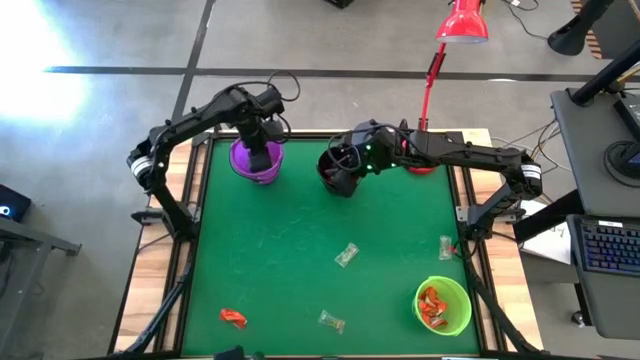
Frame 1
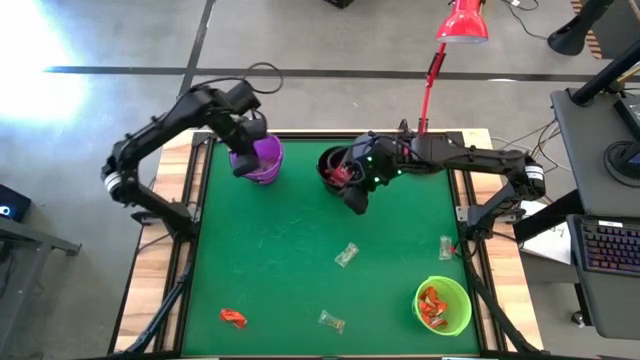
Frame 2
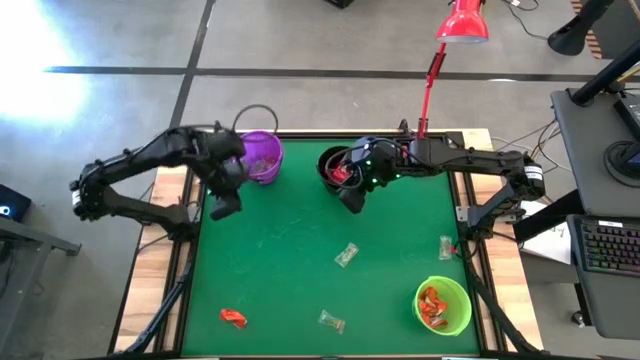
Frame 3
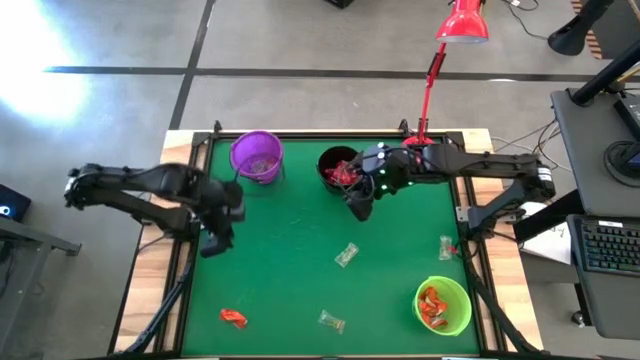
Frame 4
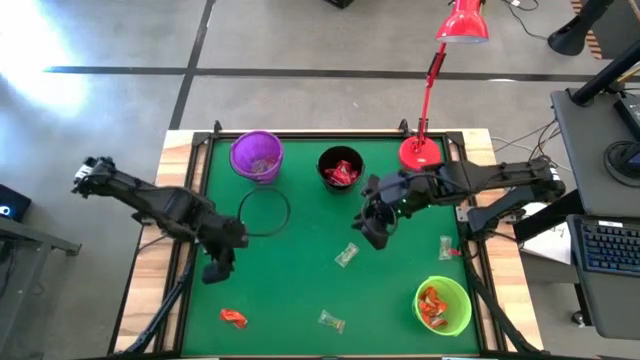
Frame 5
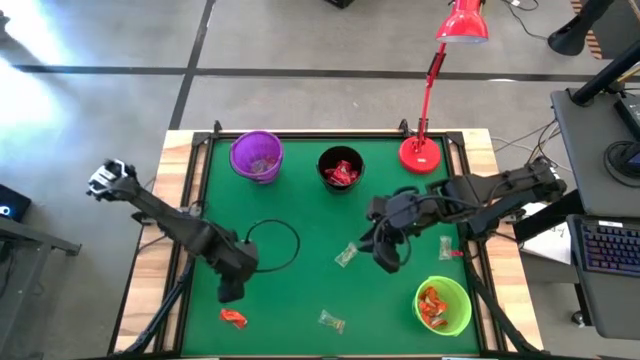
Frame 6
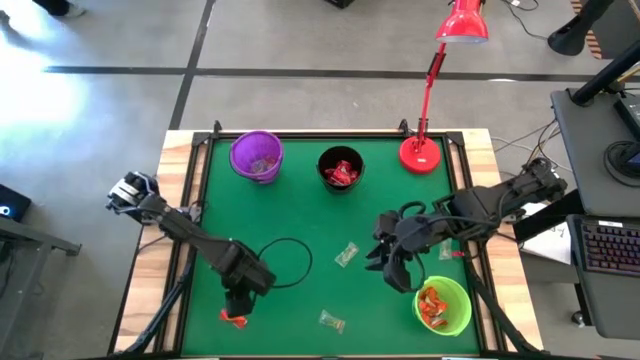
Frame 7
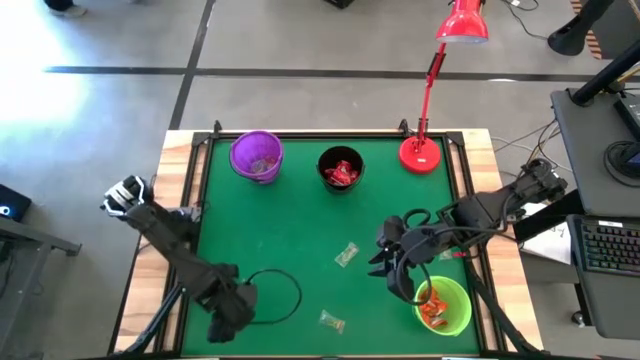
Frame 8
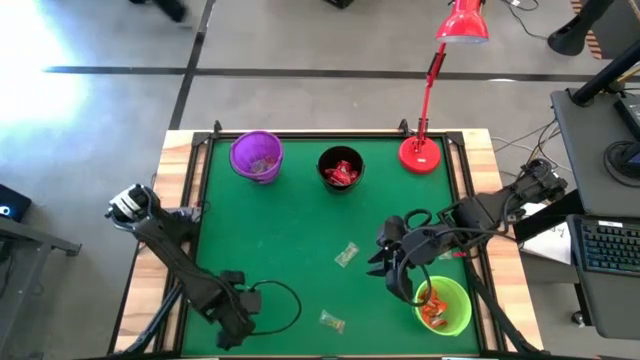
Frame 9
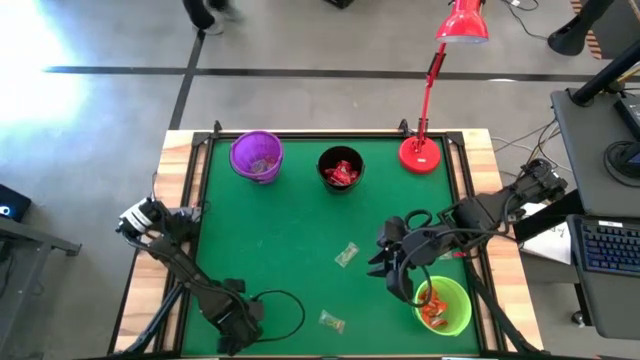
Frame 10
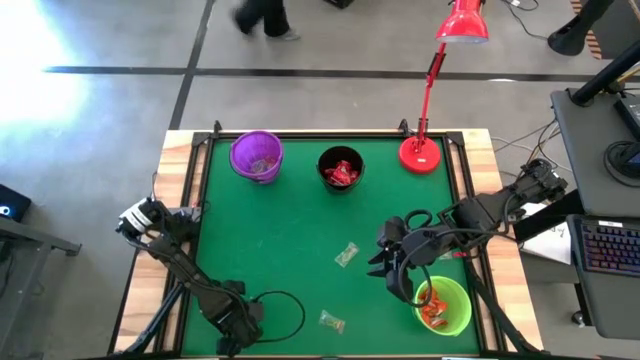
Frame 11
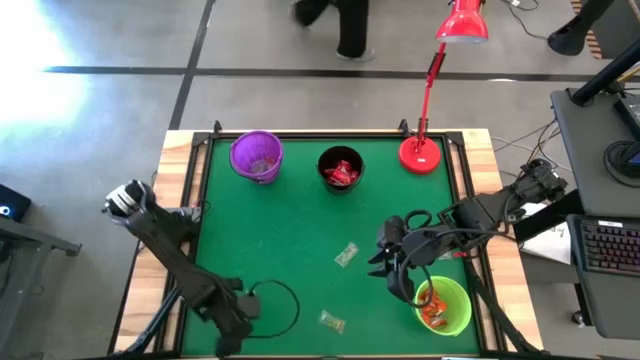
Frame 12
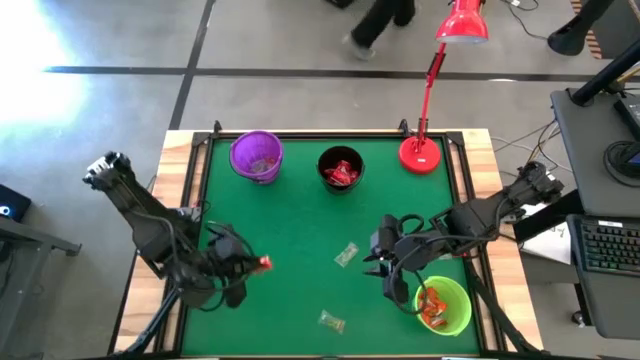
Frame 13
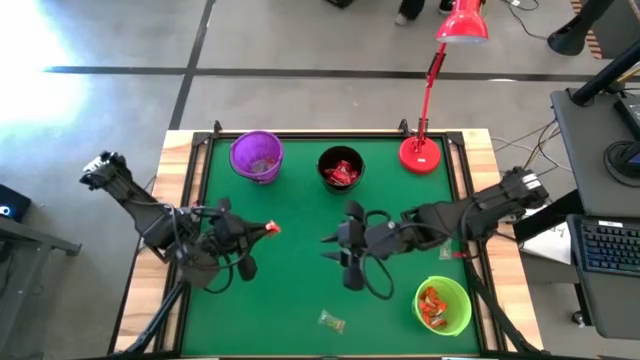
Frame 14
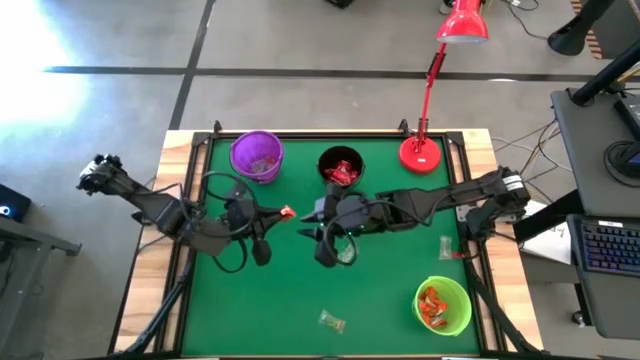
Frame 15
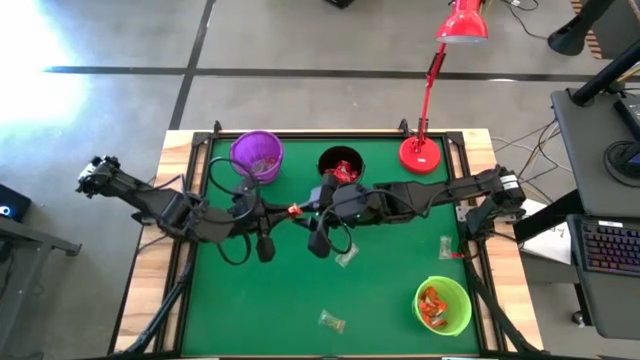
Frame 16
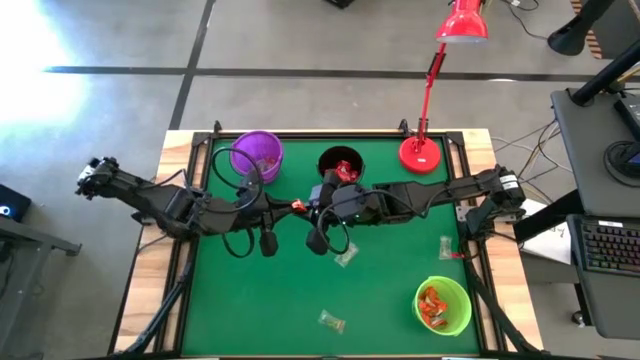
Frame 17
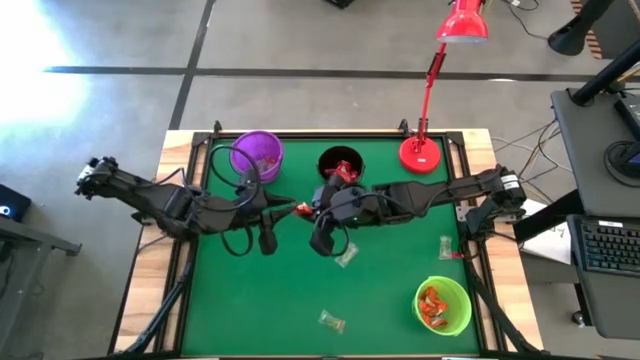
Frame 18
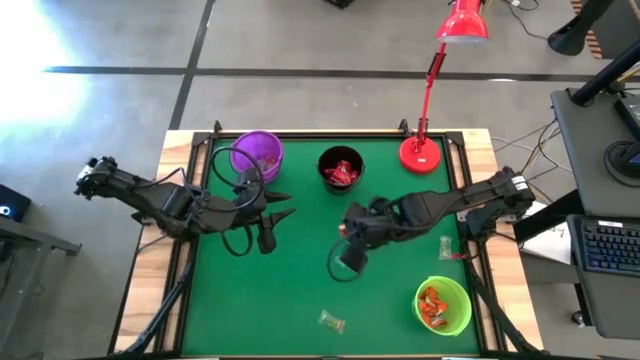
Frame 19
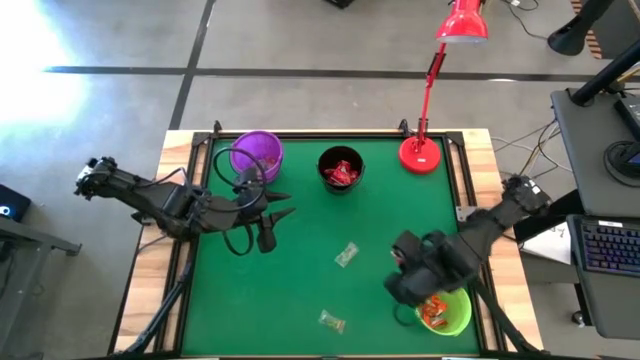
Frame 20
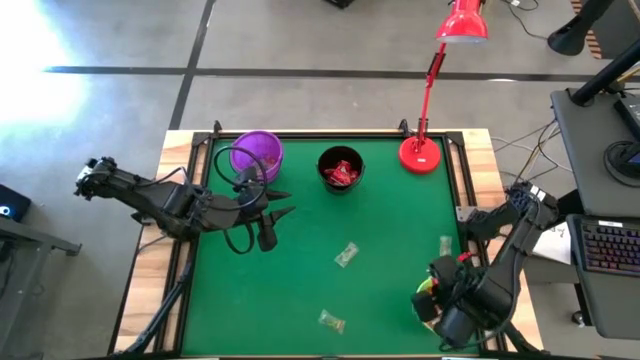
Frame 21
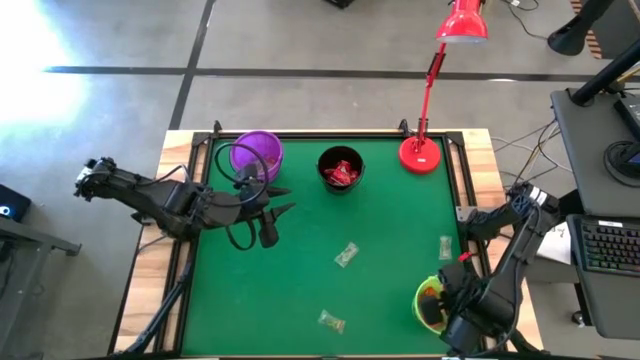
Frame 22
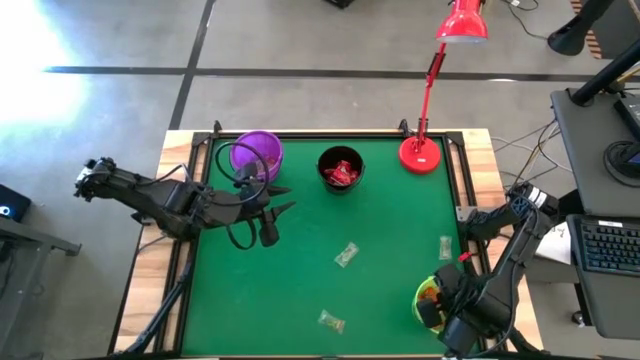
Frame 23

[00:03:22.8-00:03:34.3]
Task: Sort candy
Put the orange chocolate into the green bucket

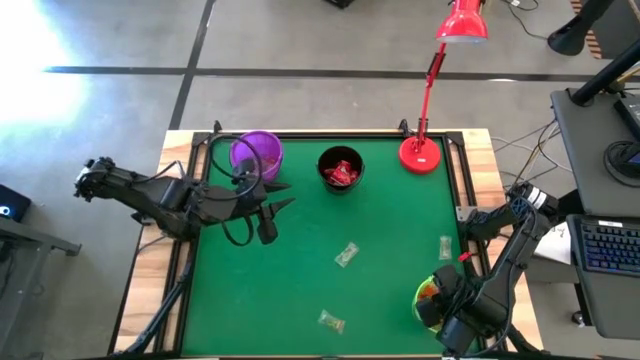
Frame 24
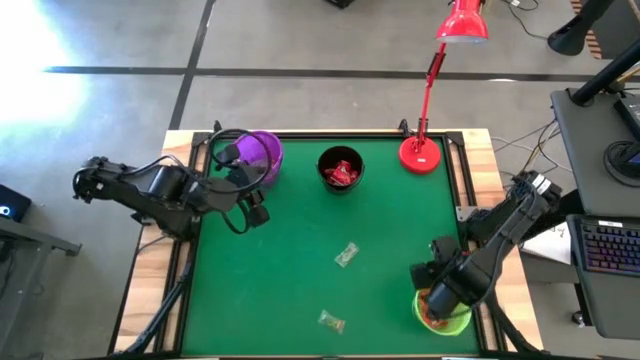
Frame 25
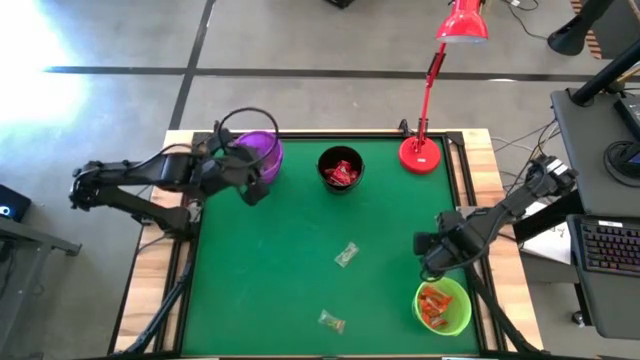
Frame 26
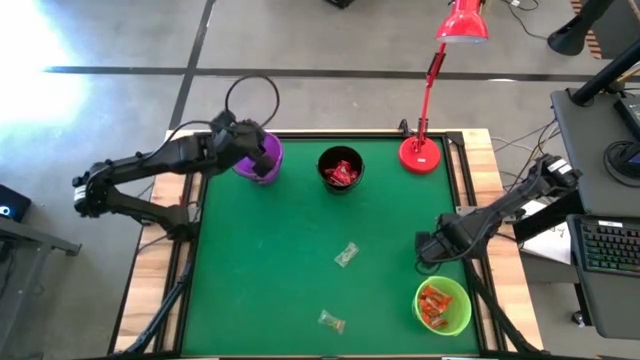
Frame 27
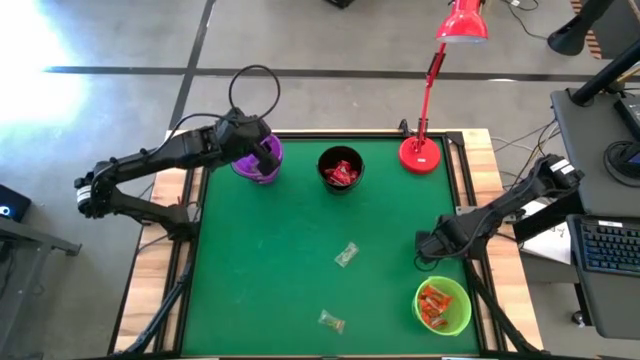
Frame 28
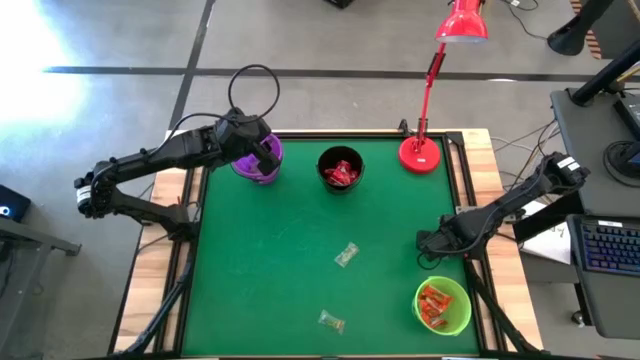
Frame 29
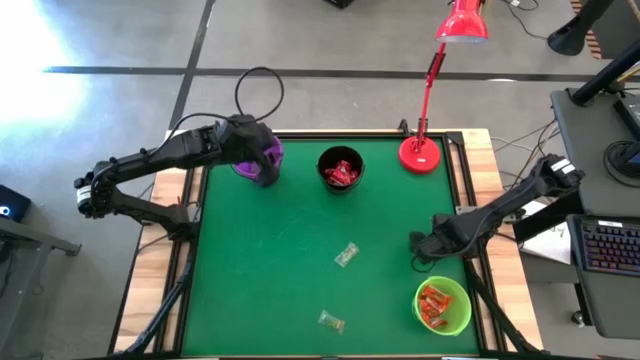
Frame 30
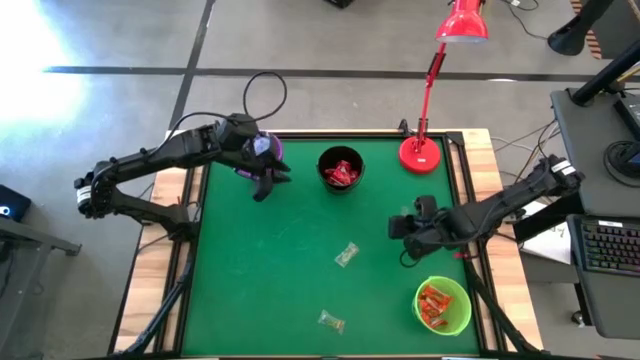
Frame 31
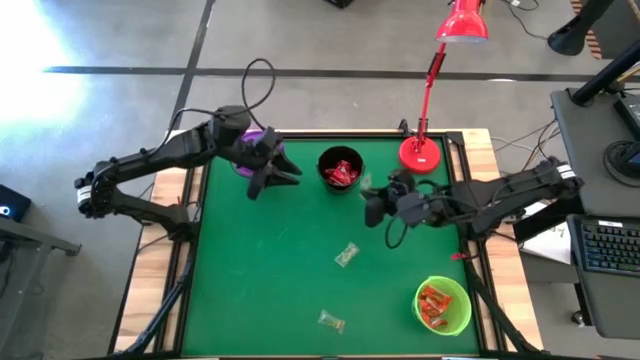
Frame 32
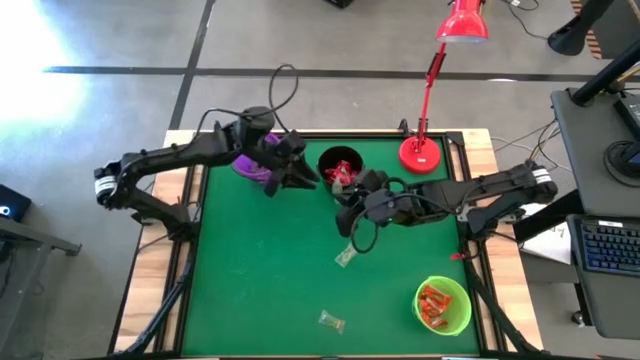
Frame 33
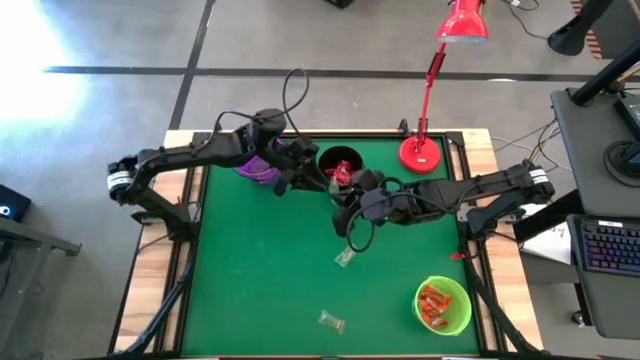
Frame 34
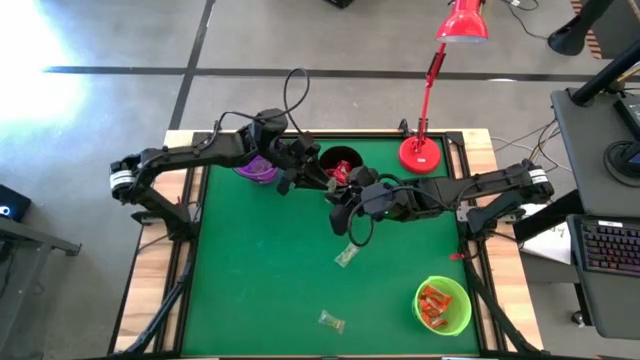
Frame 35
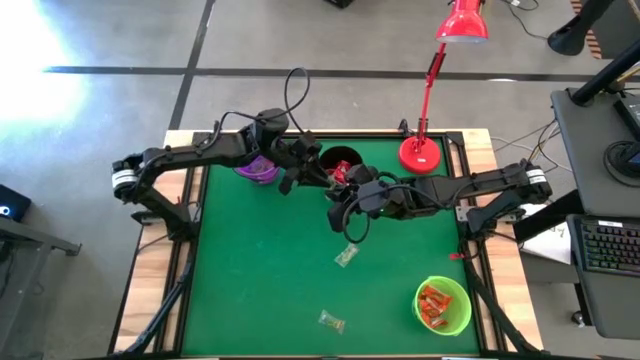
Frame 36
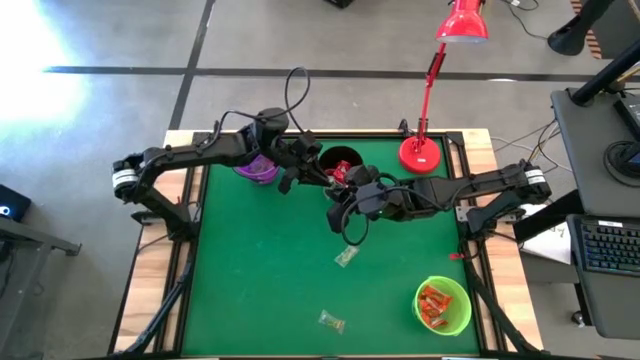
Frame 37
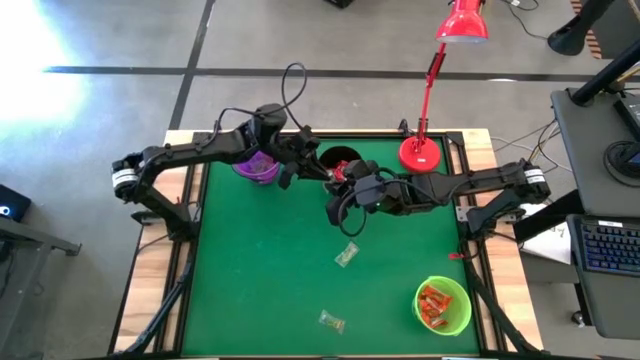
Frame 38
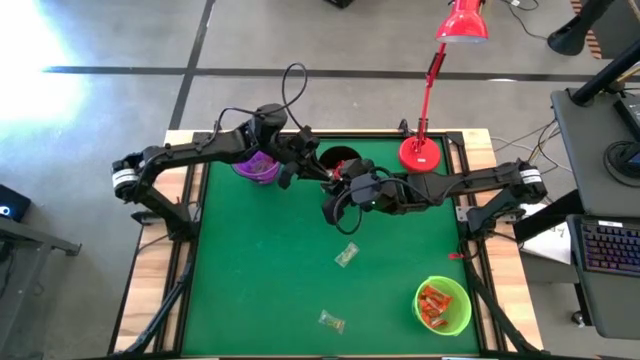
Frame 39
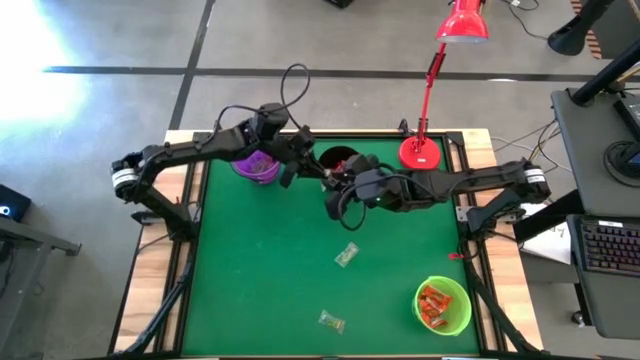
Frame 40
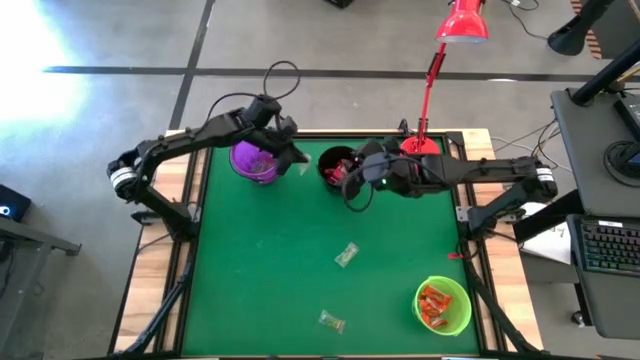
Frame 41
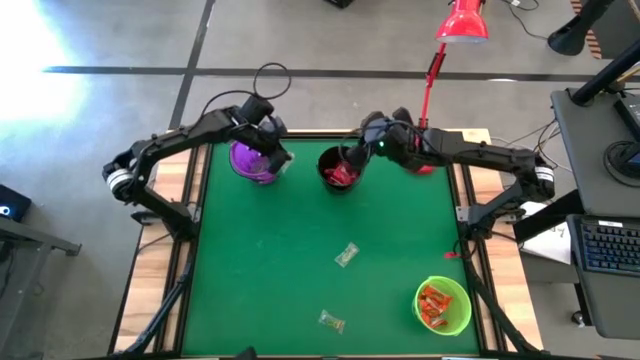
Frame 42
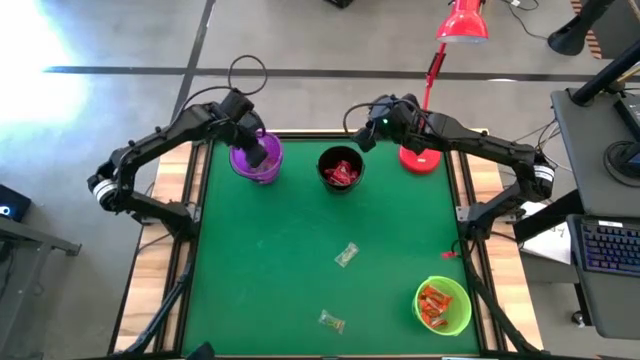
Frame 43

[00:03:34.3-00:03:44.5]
Put the green gummy into the violet bucket
